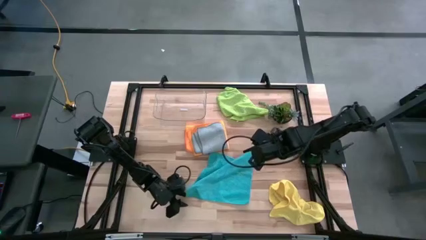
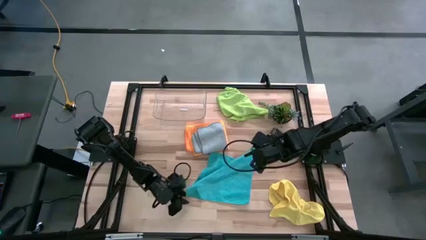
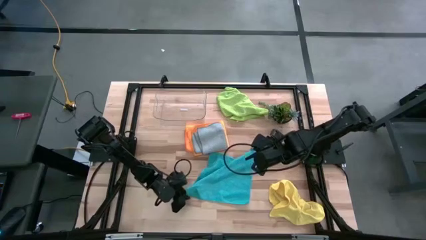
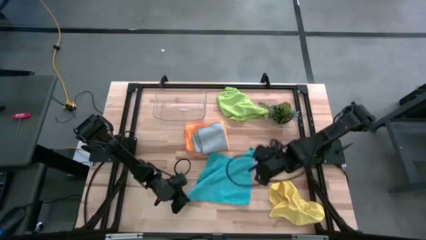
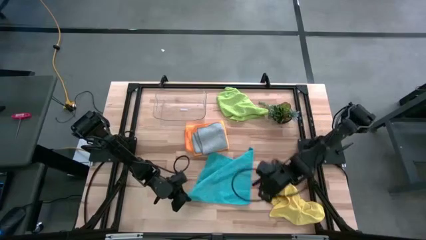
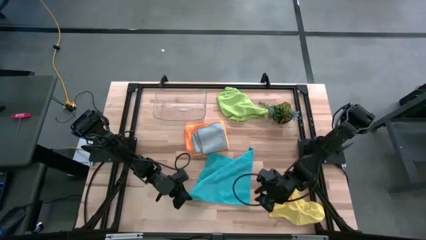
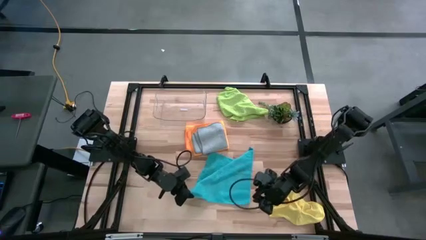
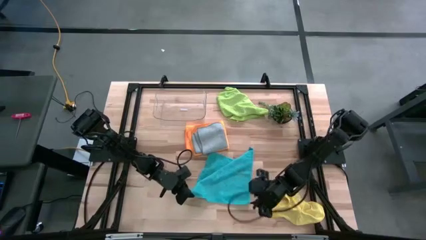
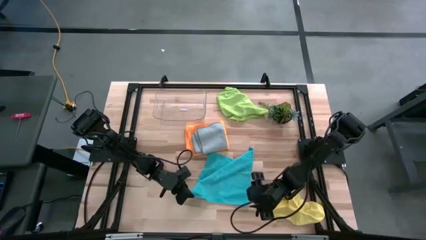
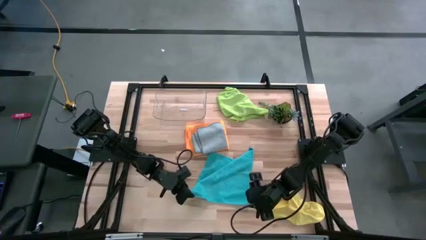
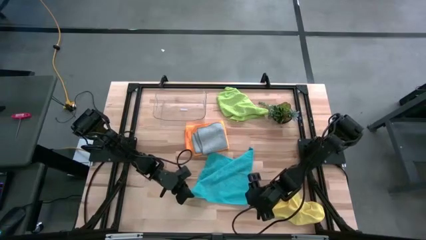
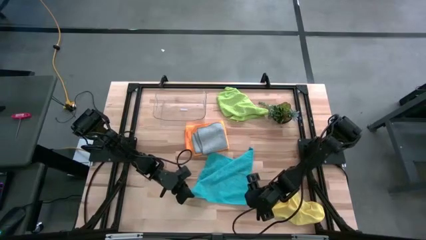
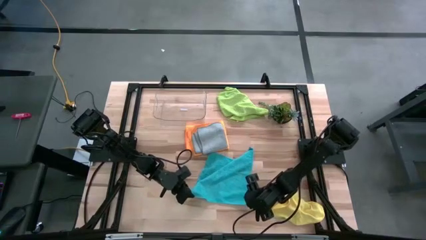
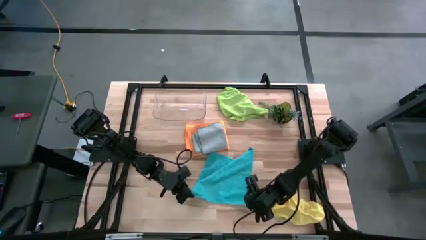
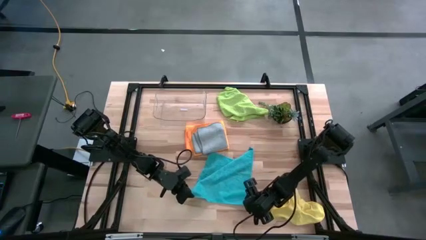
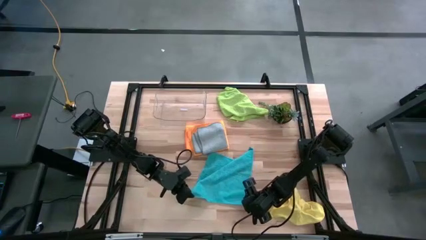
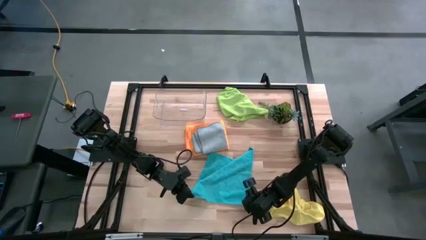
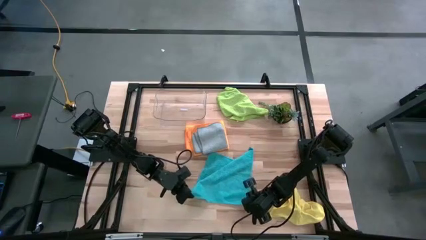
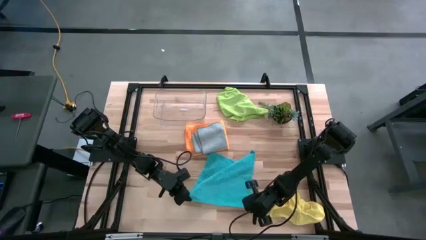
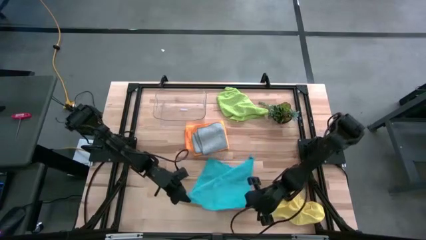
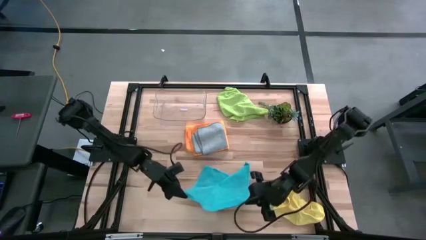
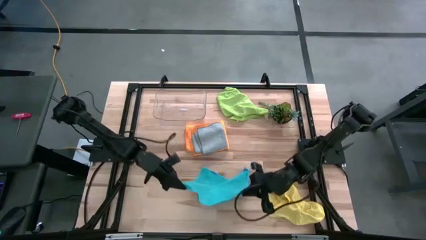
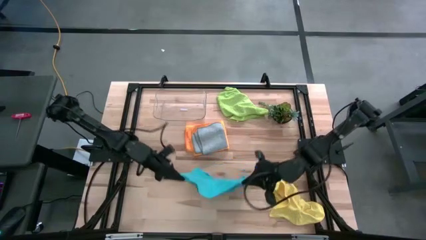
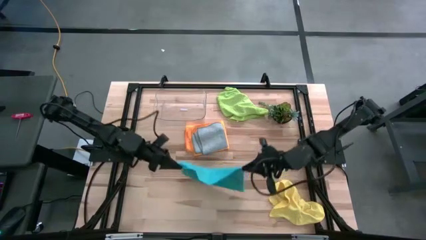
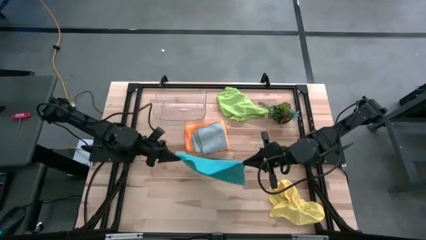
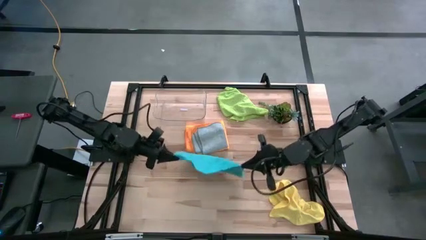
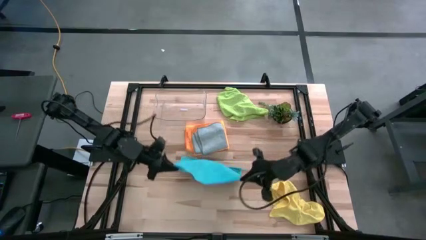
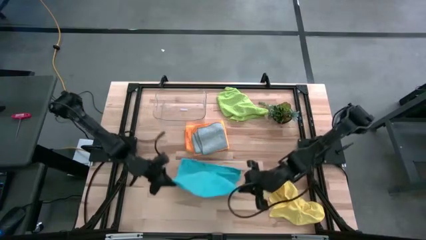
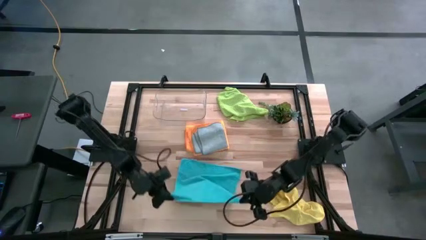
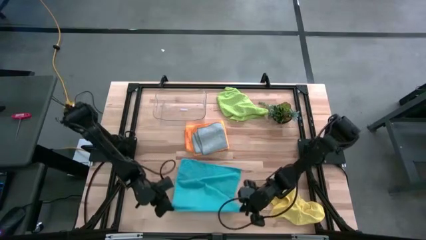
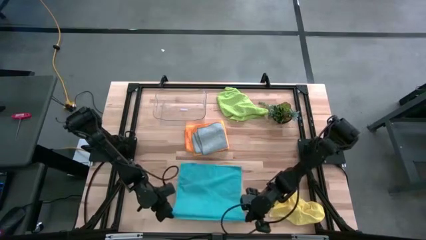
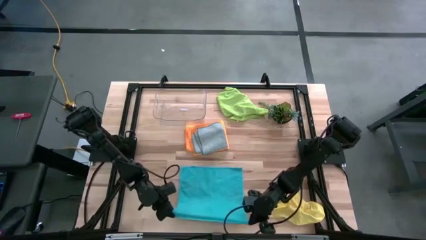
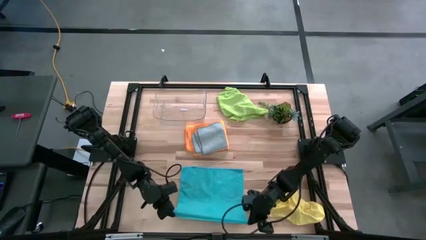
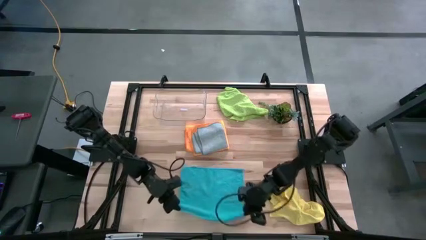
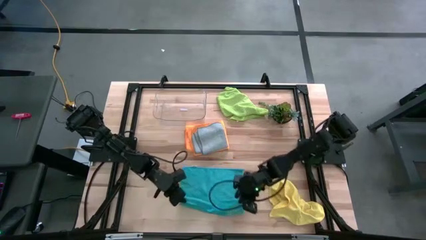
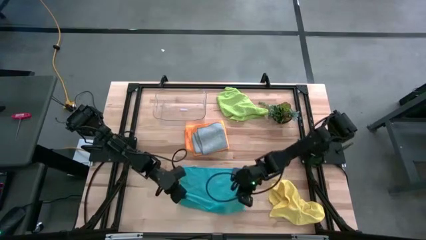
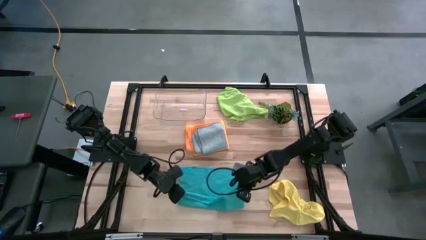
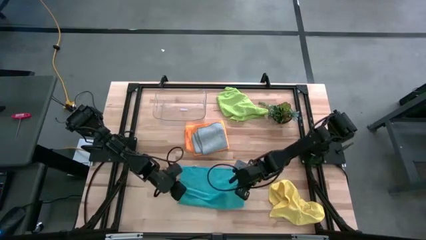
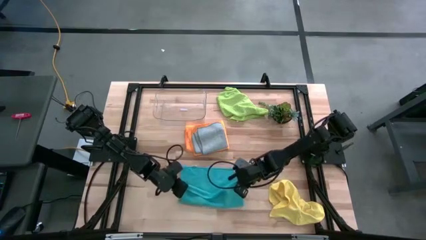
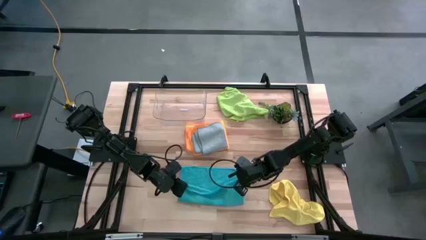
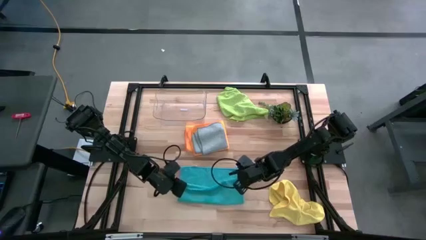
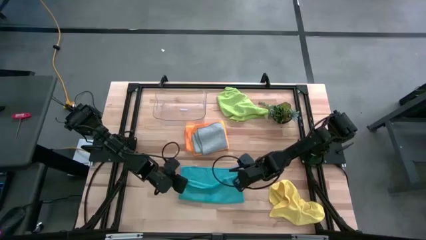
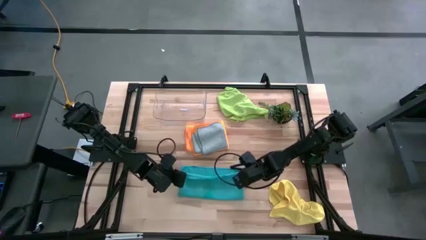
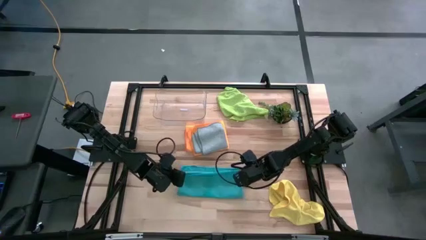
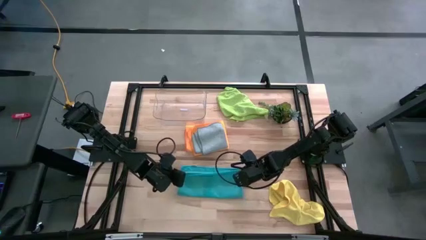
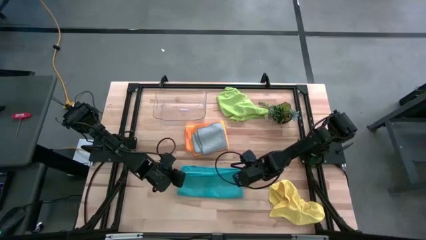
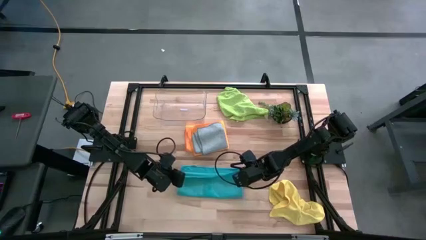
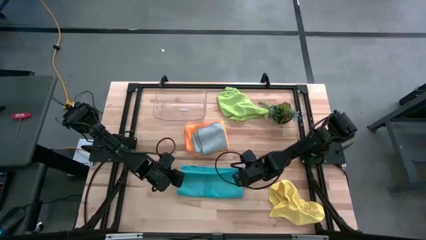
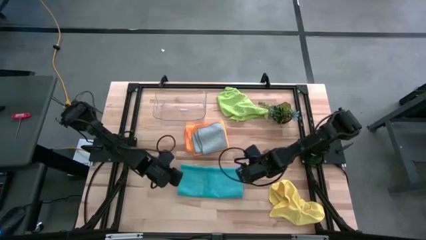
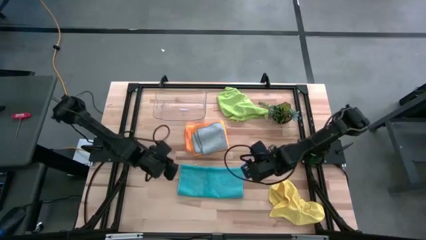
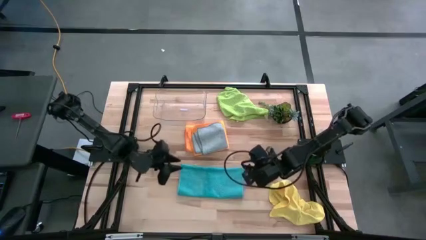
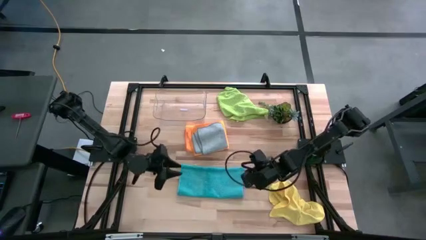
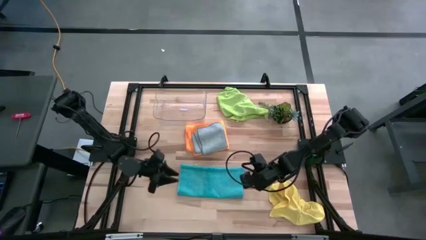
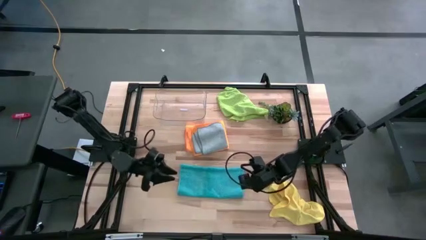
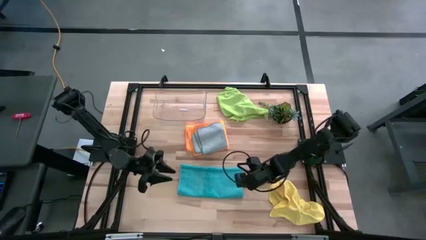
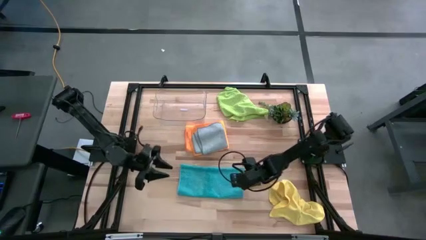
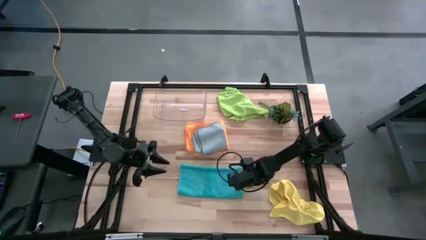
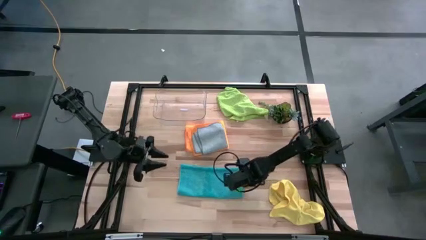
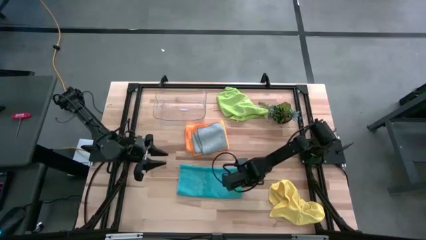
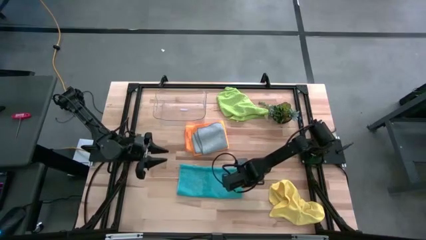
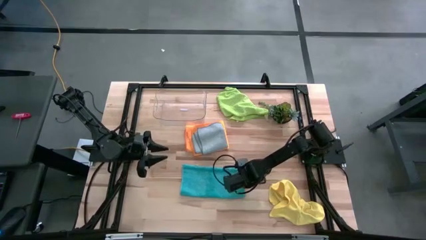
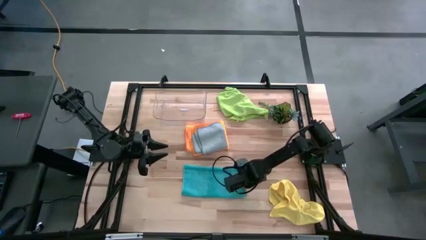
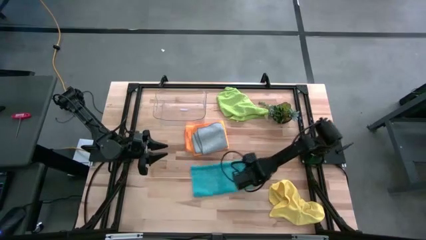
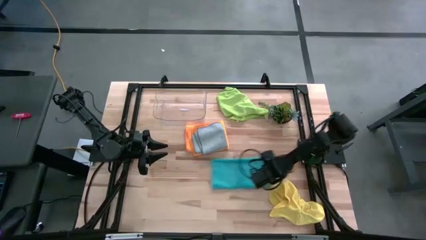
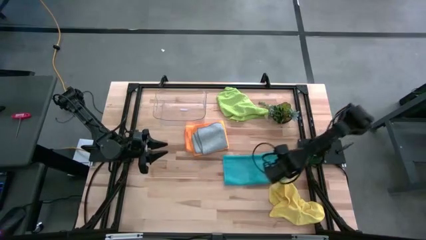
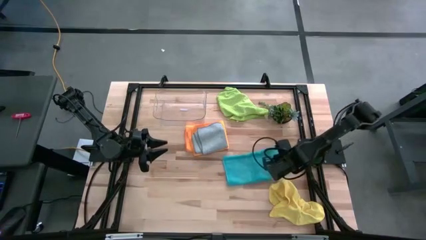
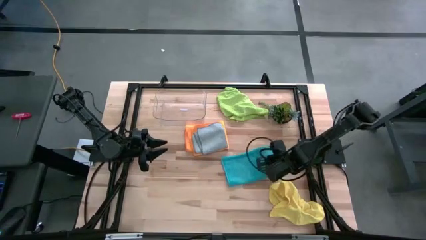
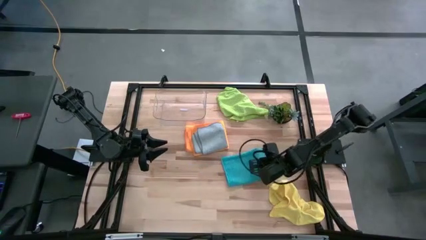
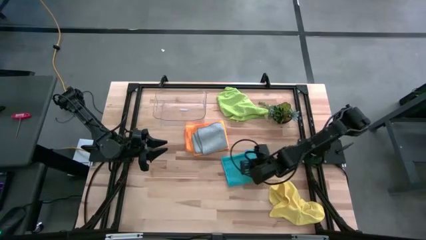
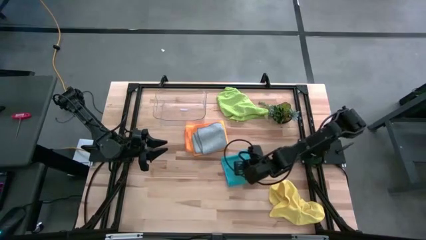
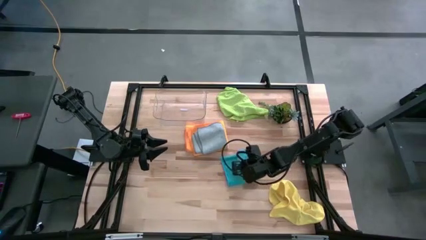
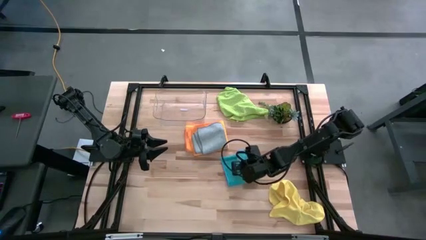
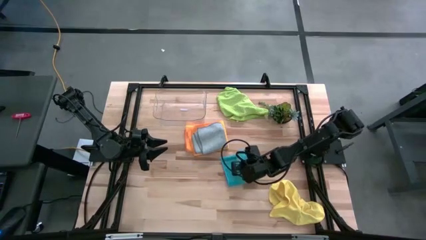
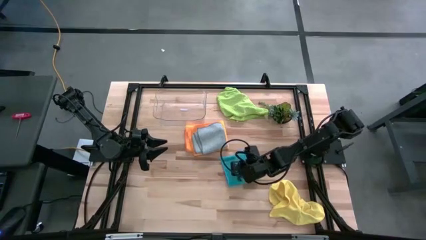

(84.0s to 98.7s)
Task: Fold microfiber towels
Fold the blue towel

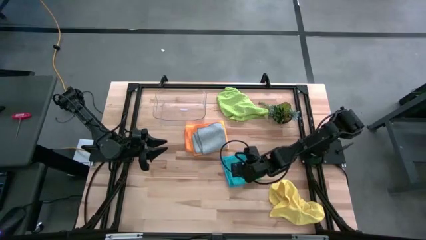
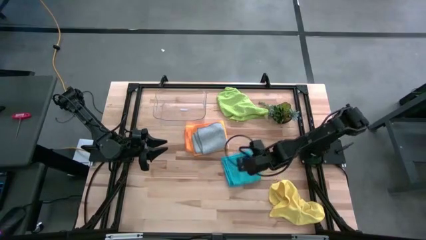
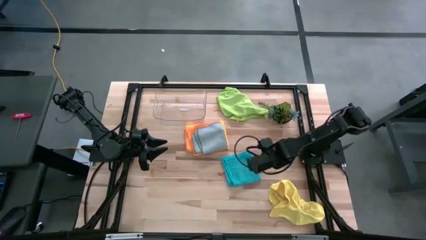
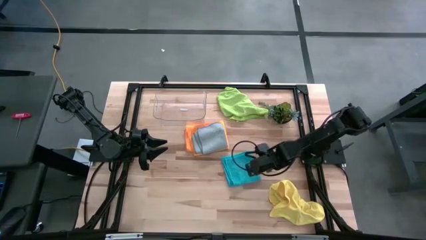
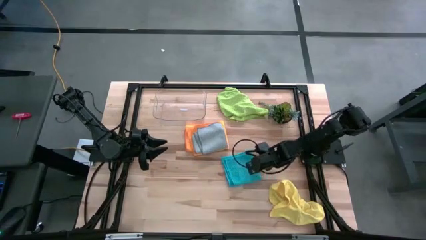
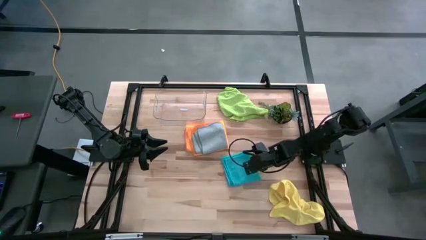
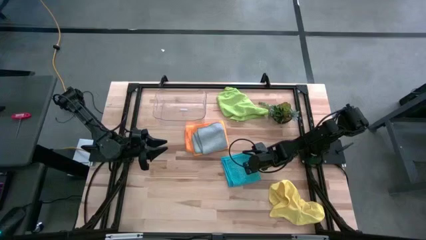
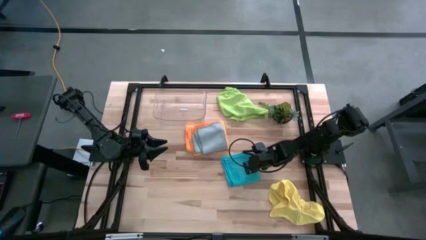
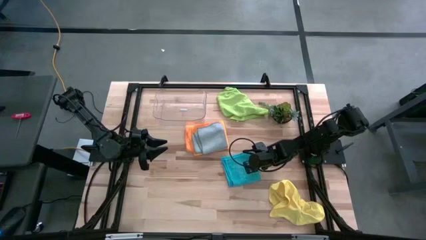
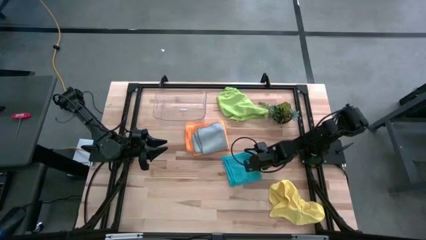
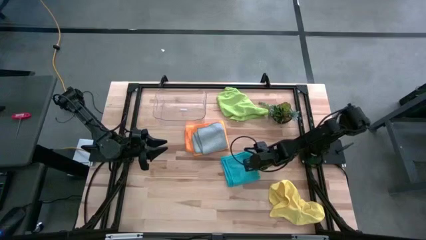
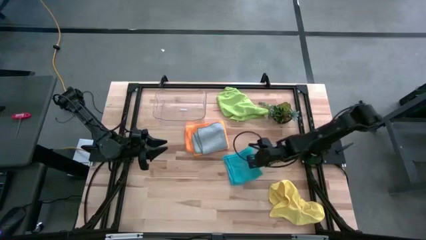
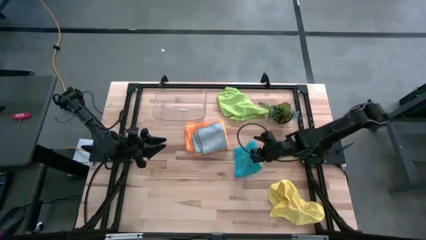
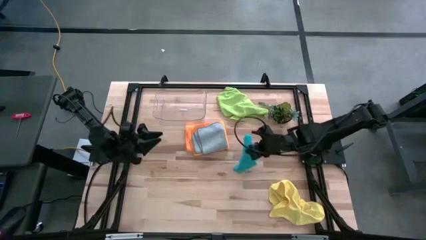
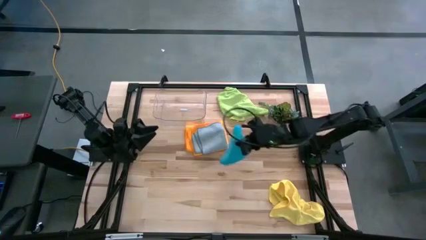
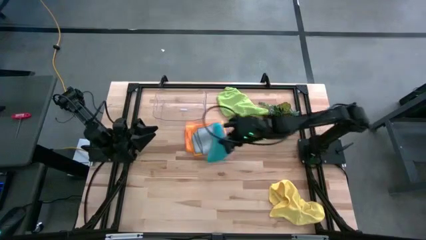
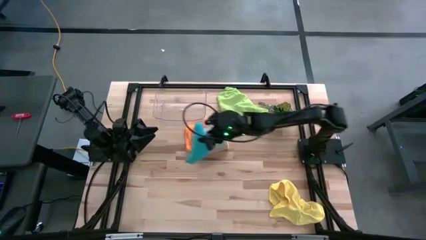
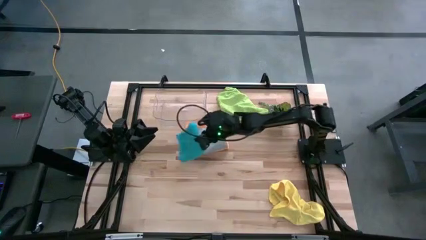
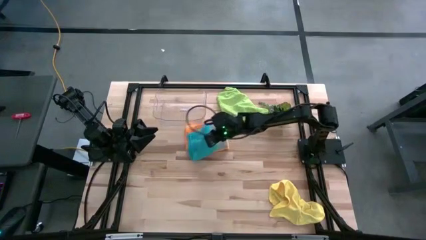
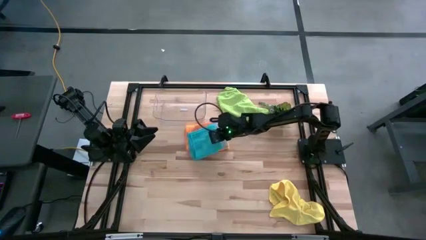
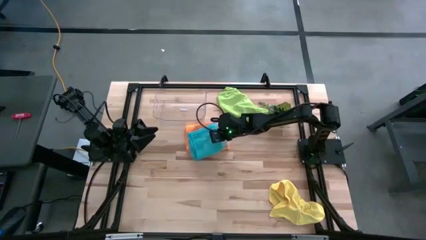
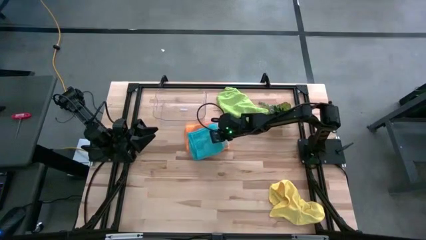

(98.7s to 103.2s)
Stack the blue towel on the gray towel
